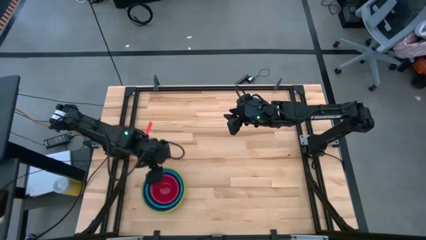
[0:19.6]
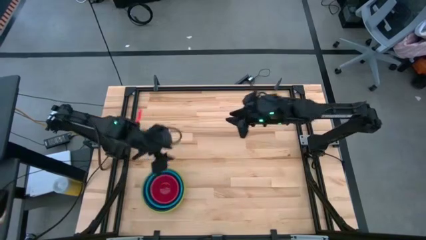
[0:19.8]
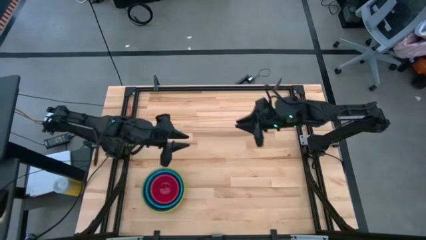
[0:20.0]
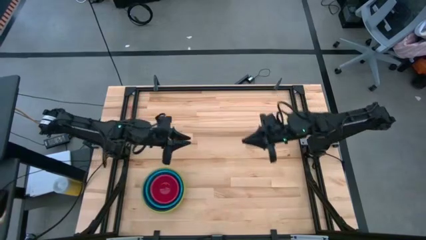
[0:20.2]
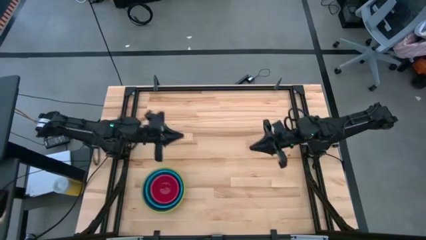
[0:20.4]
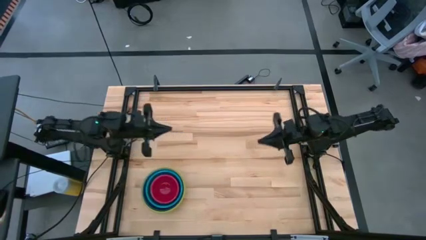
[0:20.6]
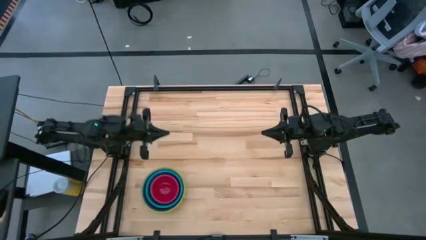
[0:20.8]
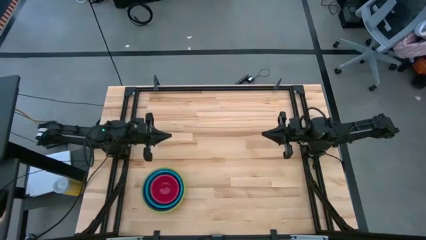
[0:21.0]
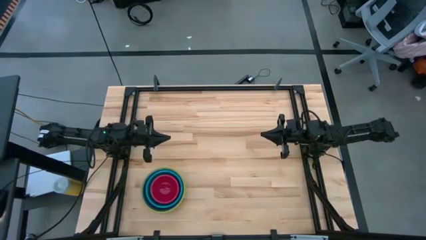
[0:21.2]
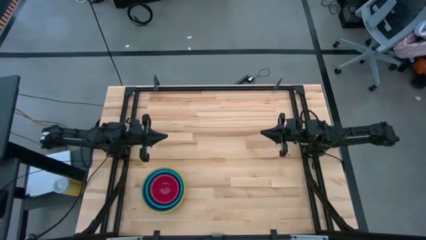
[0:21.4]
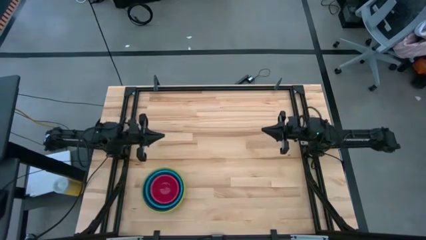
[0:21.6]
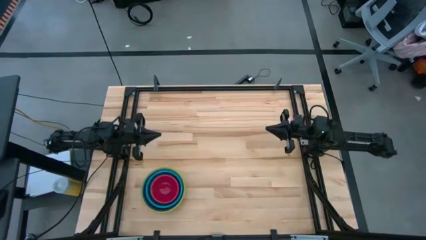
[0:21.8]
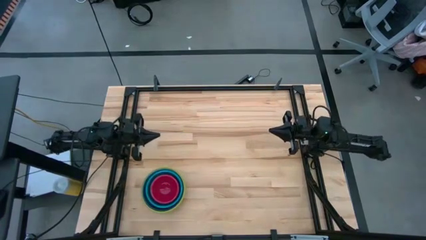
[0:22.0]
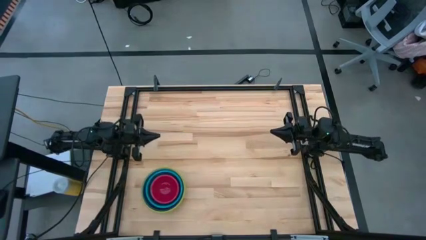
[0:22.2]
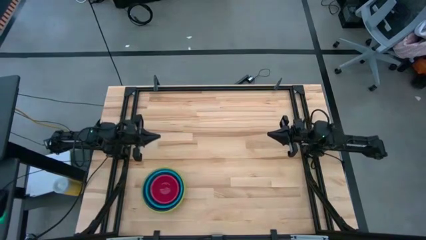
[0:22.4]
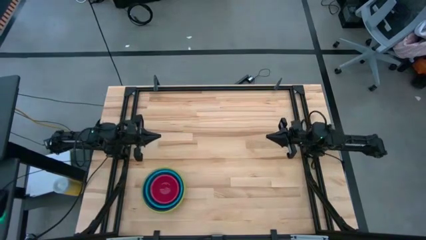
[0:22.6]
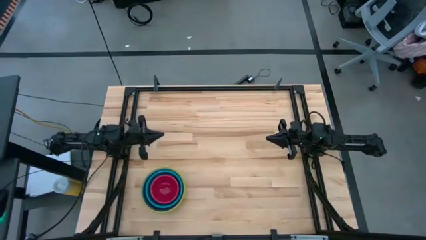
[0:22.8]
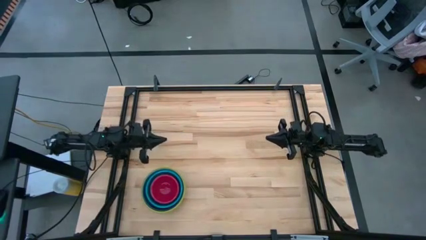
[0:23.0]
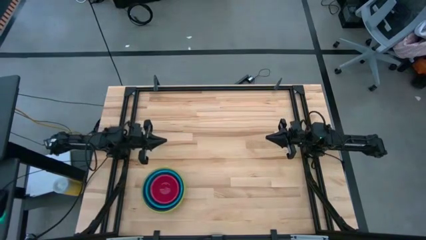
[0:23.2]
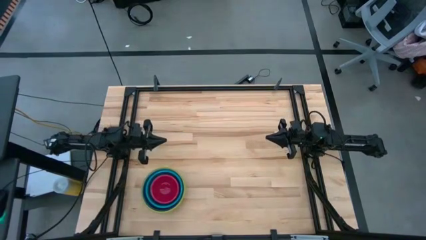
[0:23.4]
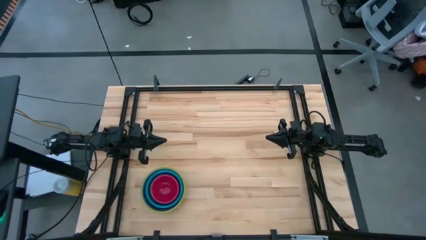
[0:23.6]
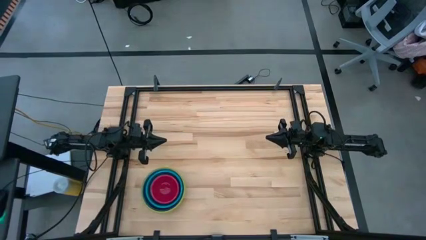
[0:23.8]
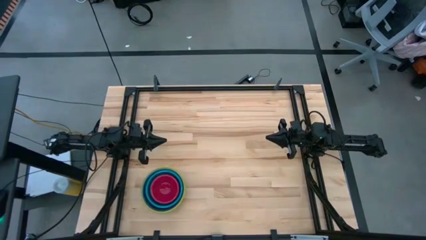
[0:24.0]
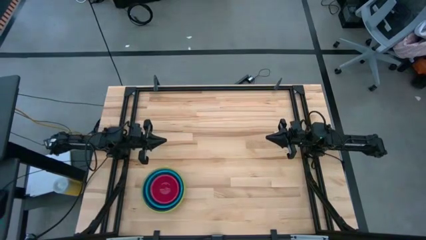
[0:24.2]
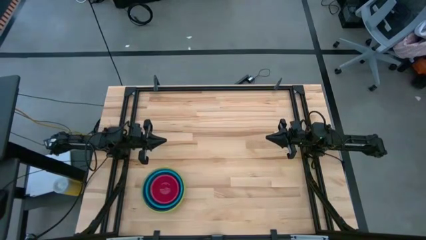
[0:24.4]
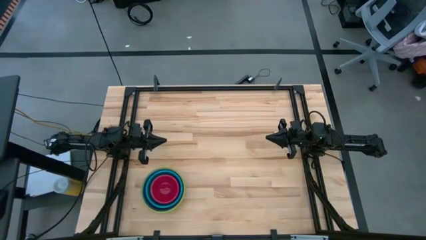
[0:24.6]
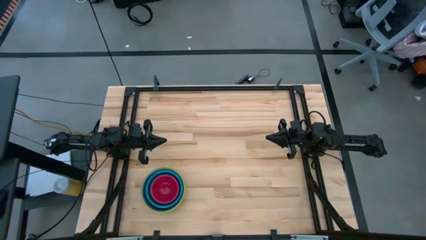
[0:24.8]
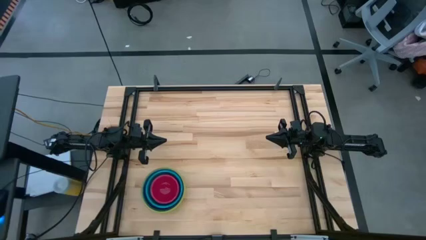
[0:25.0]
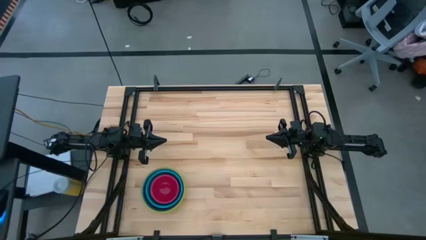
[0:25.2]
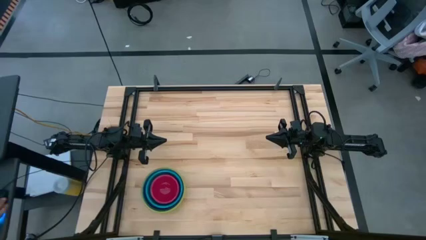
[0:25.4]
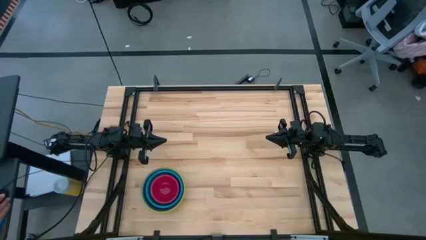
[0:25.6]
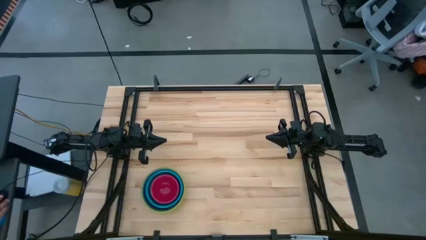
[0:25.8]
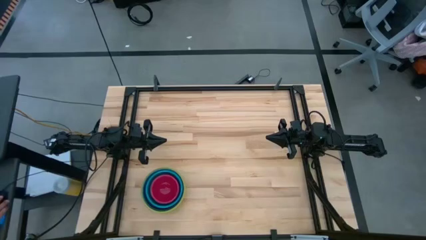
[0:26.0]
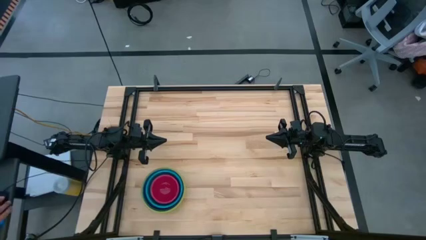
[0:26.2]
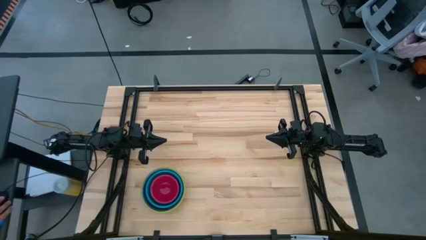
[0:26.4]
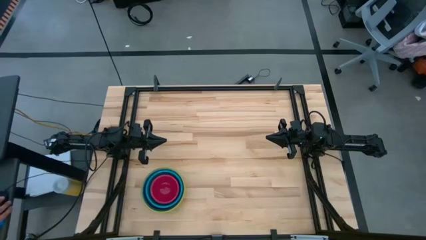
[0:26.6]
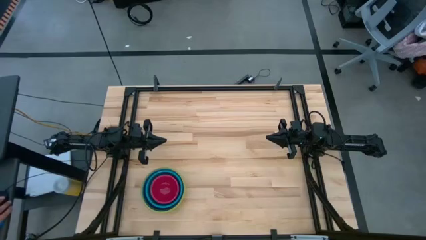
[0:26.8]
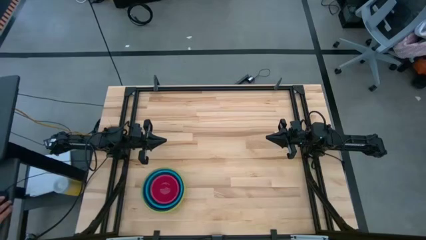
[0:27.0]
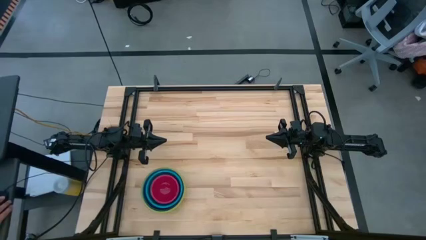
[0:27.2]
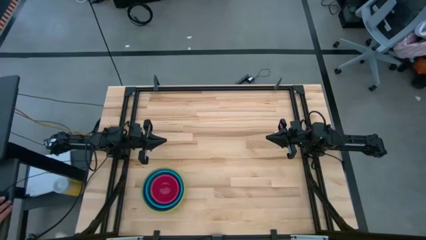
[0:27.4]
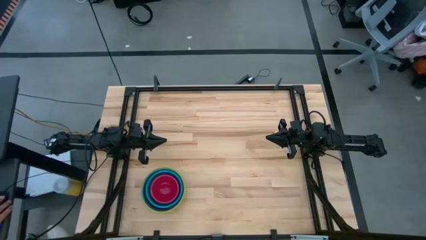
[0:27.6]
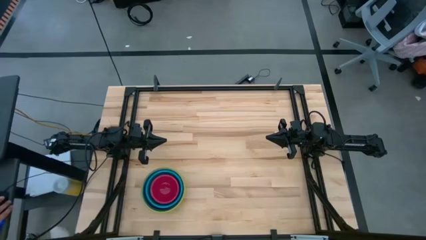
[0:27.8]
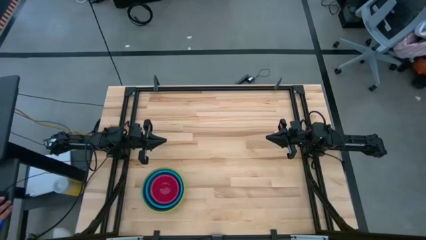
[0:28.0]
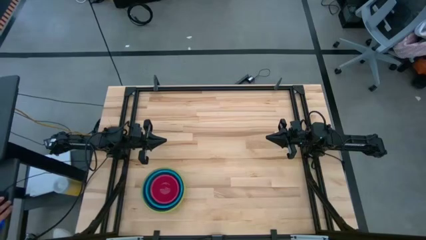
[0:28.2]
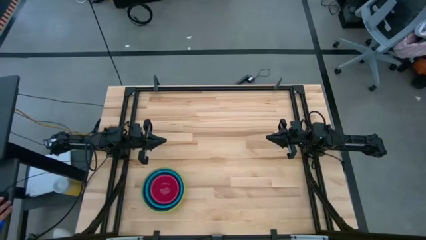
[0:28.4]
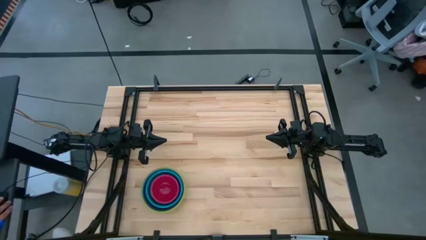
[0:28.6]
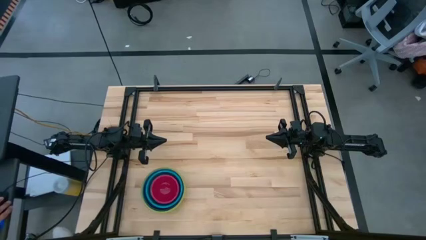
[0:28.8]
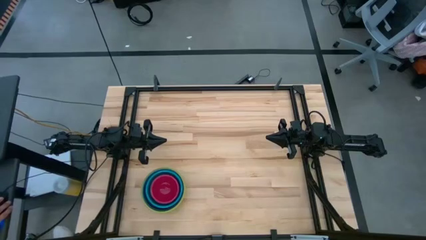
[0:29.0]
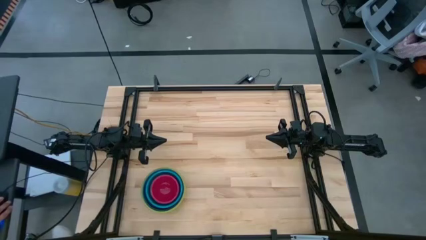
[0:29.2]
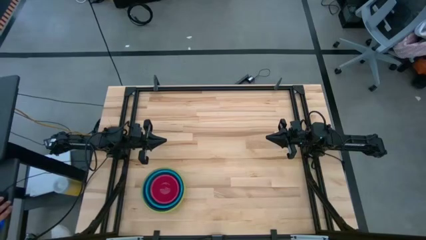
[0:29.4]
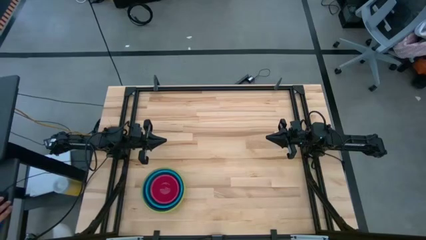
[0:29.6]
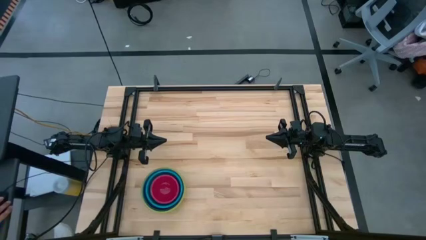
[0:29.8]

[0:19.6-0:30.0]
Return to Home Position

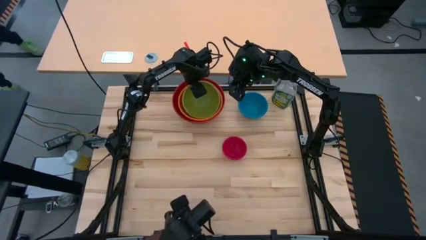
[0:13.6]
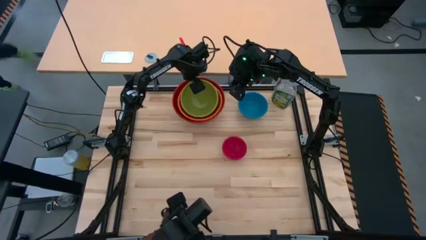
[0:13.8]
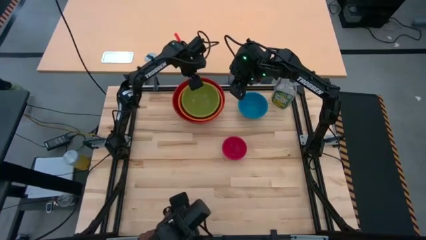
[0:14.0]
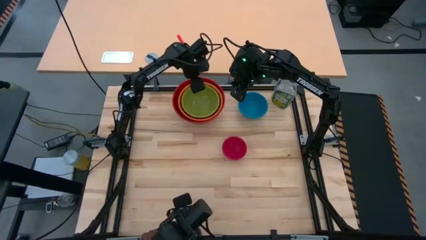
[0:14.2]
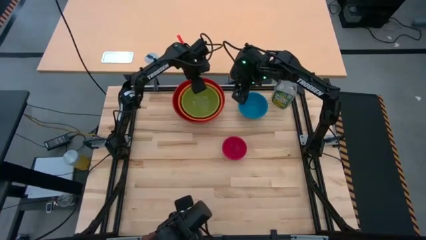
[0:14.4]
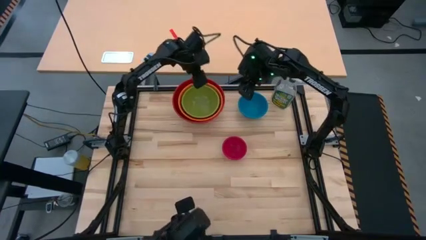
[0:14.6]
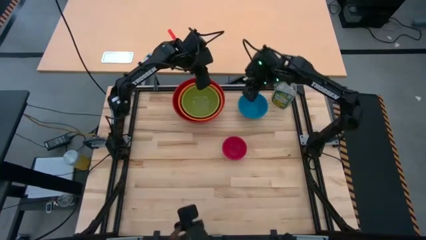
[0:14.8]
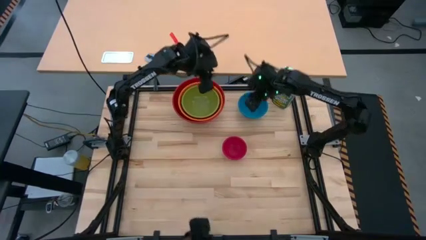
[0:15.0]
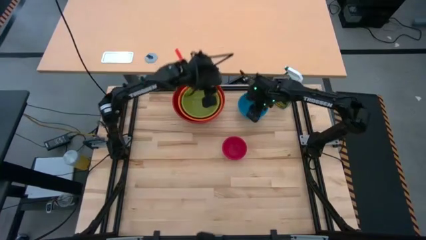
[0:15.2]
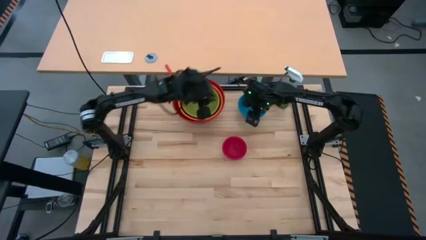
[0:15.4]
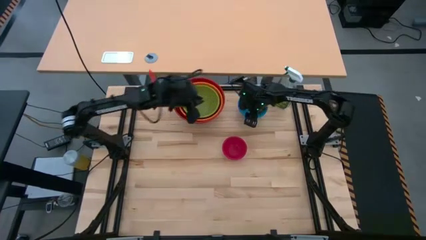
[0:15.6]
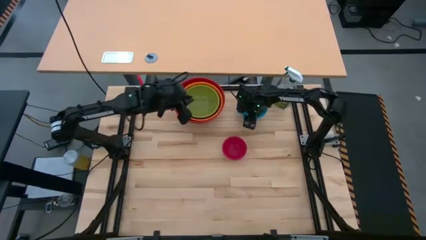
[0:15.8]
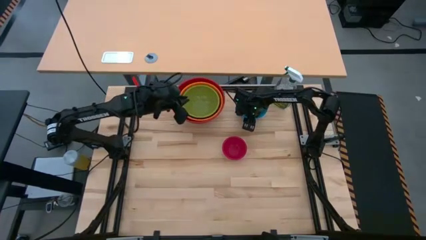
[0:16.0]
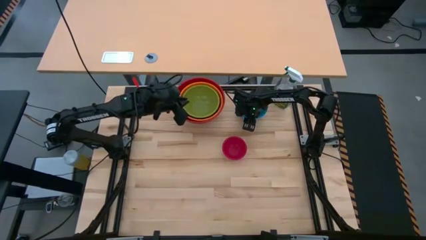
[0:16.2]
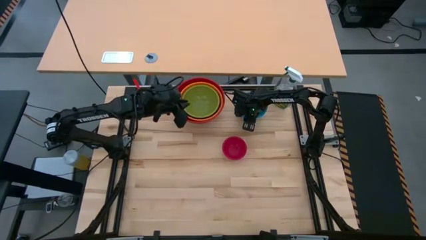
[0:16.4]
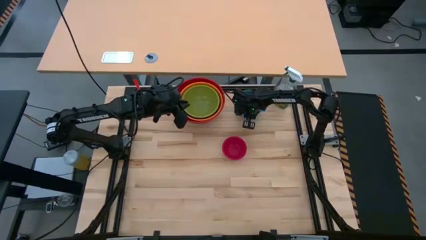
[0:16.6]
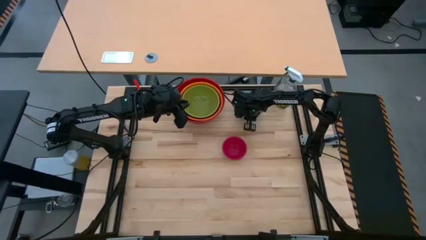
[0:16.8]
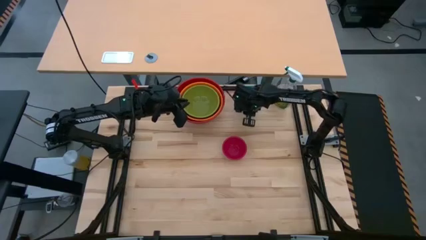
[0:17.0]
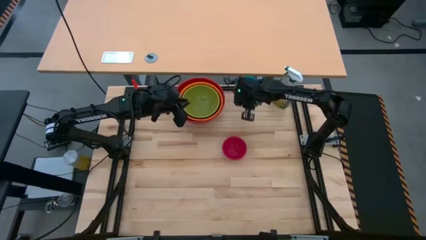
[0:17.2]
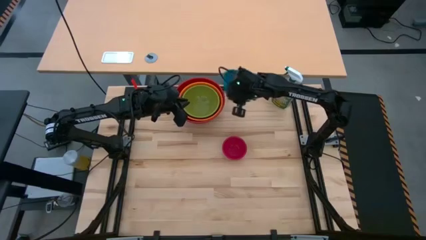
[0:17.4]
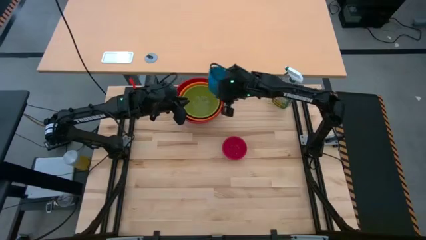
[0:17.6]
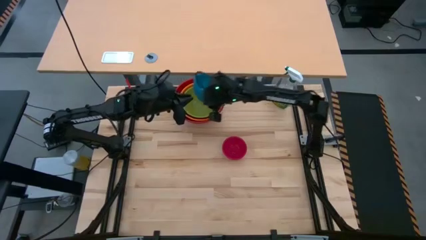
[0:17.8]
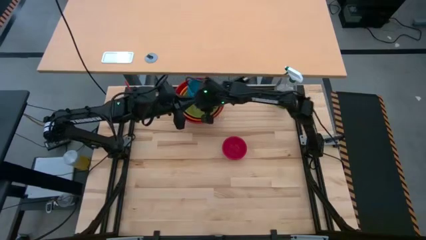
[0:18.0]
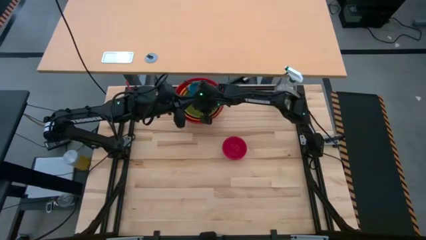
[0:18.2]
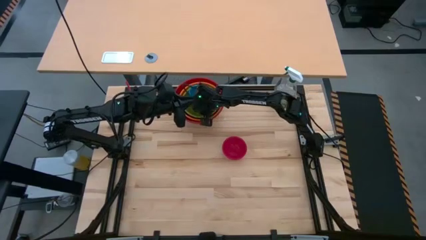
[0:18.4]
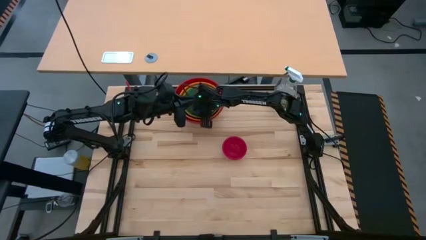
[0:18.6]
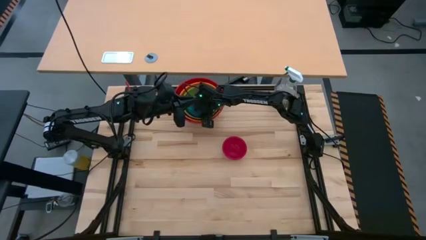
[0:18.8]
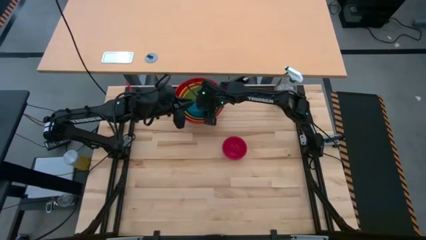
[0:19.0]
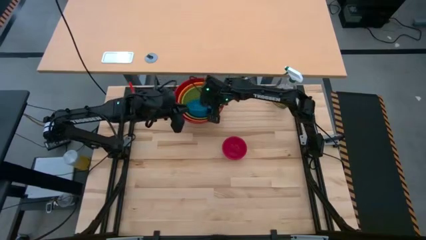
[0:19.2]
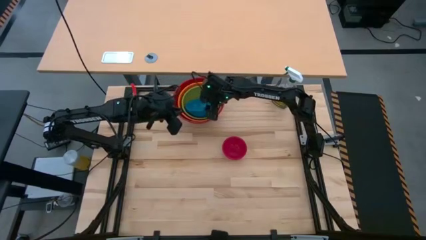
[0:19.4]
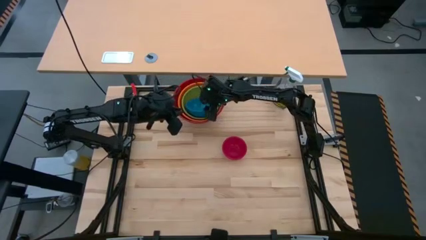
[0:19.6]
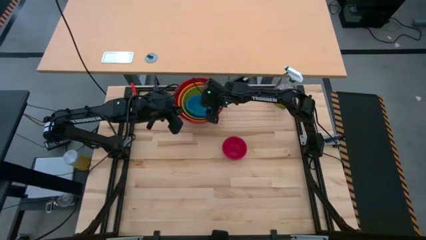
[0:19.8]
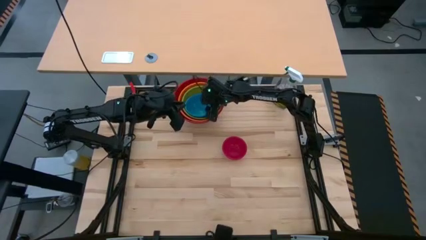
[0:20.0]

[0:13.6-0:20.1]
Stack the blue bowl on the green bowl
